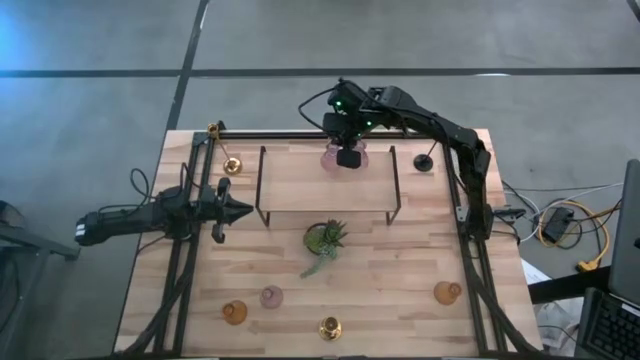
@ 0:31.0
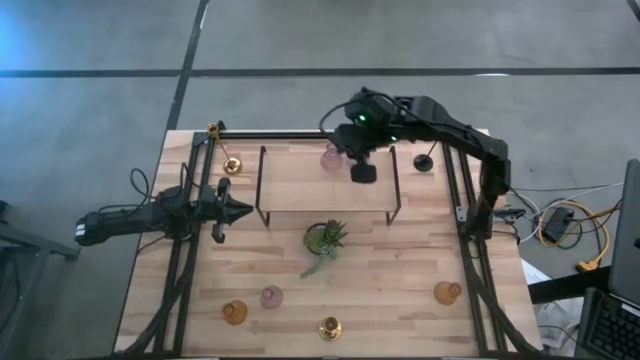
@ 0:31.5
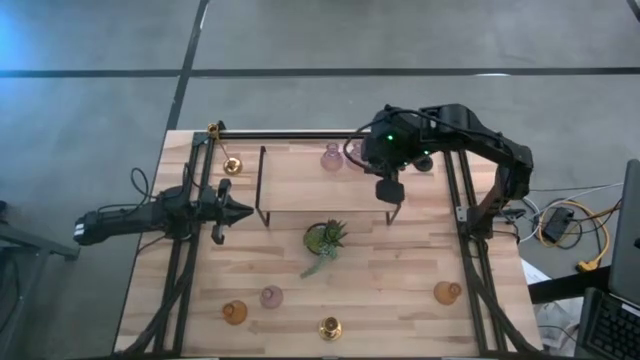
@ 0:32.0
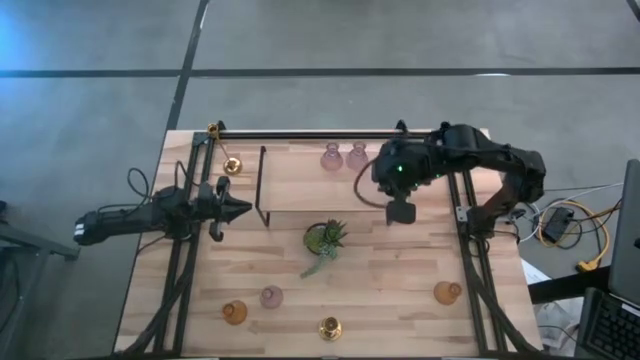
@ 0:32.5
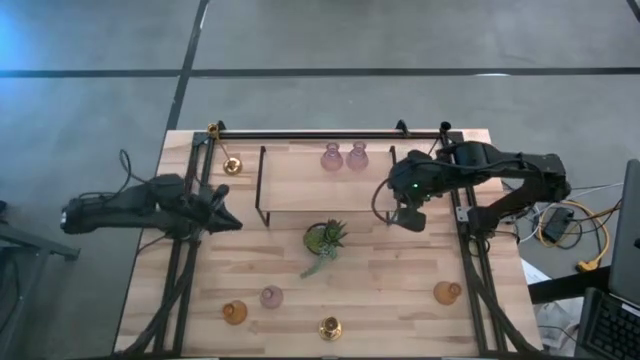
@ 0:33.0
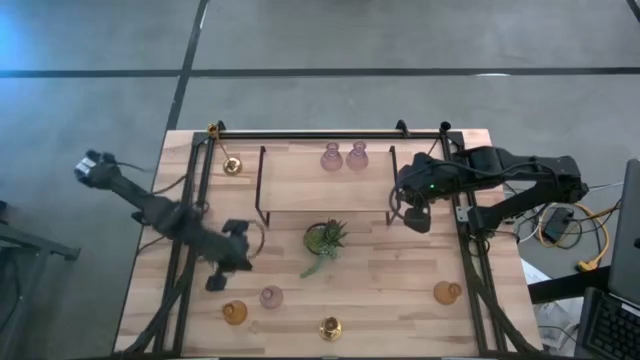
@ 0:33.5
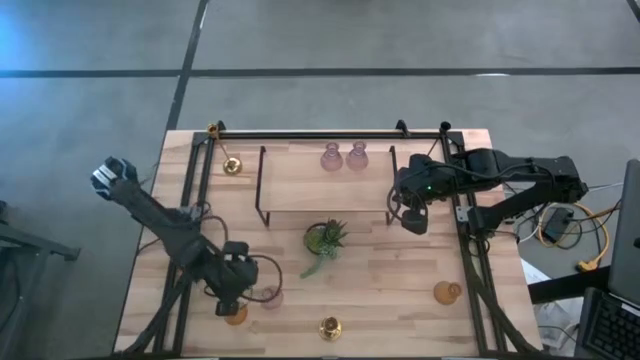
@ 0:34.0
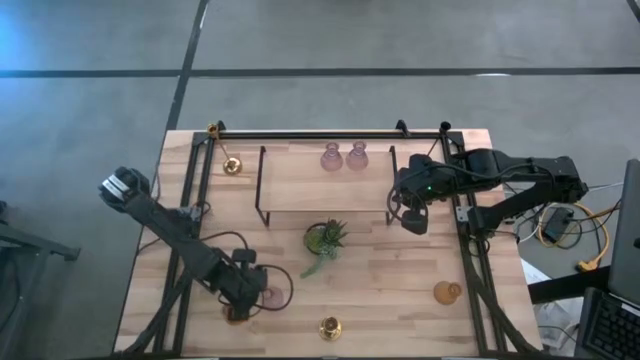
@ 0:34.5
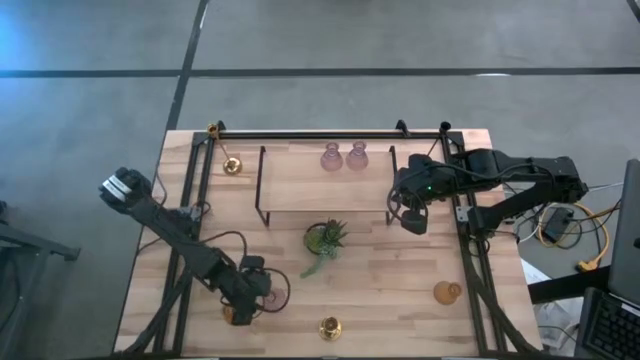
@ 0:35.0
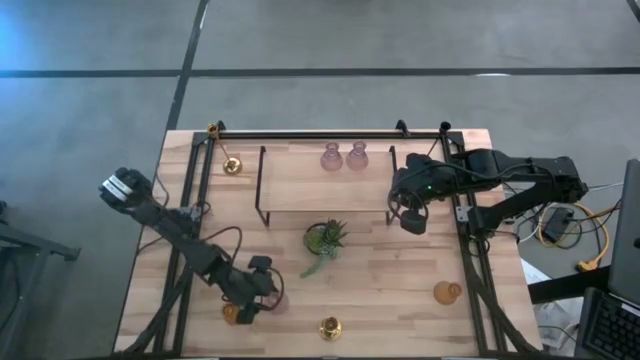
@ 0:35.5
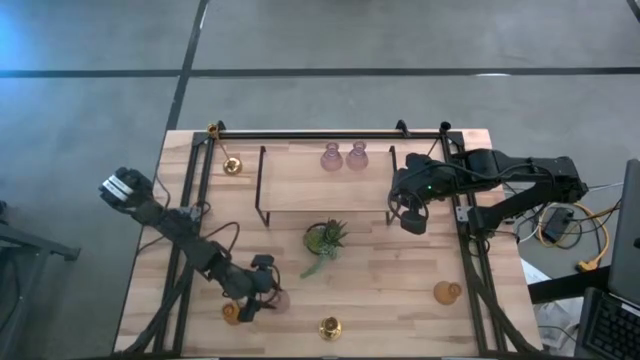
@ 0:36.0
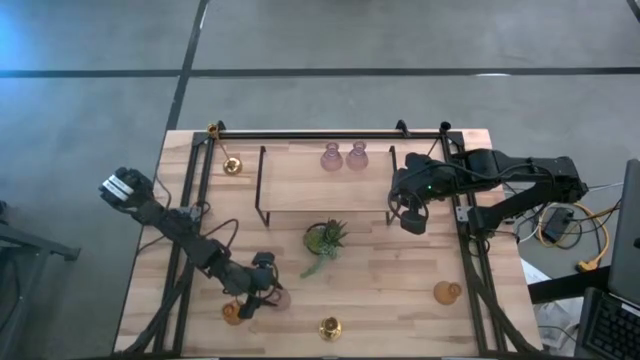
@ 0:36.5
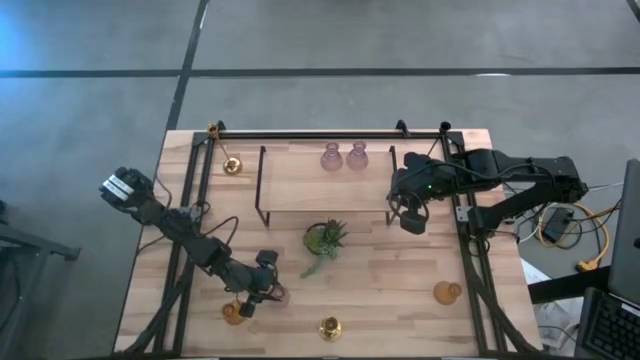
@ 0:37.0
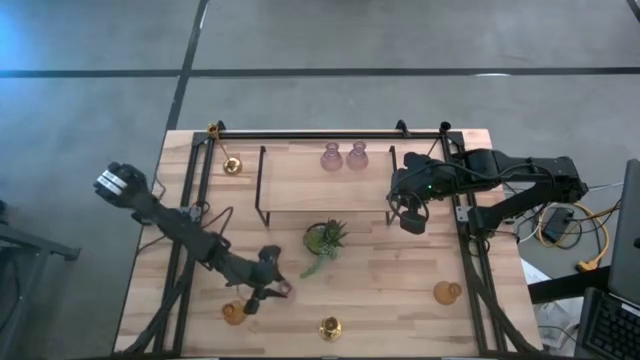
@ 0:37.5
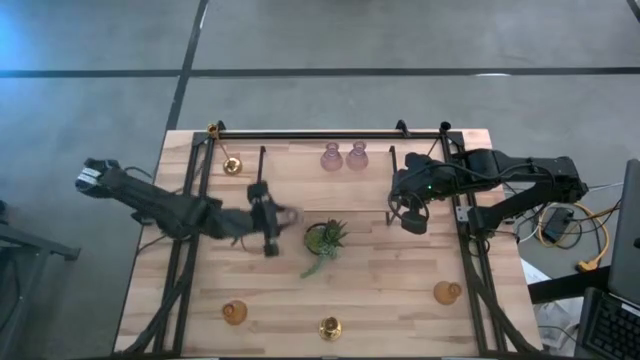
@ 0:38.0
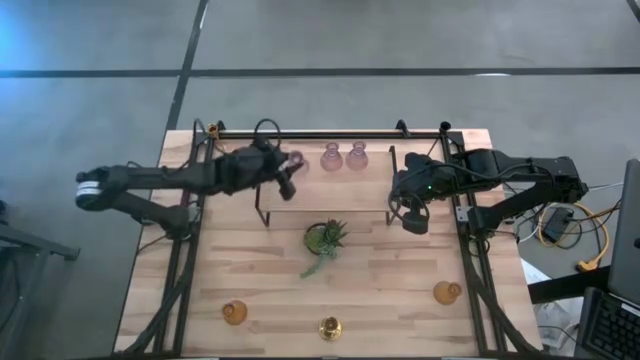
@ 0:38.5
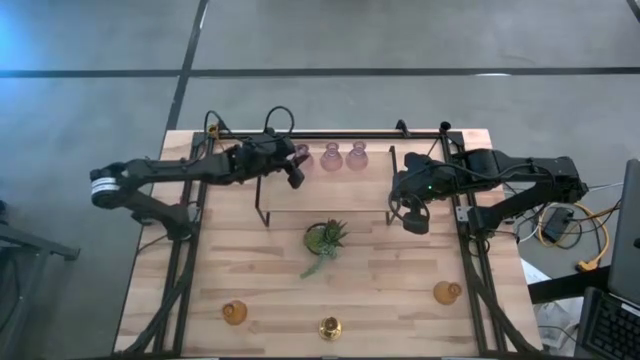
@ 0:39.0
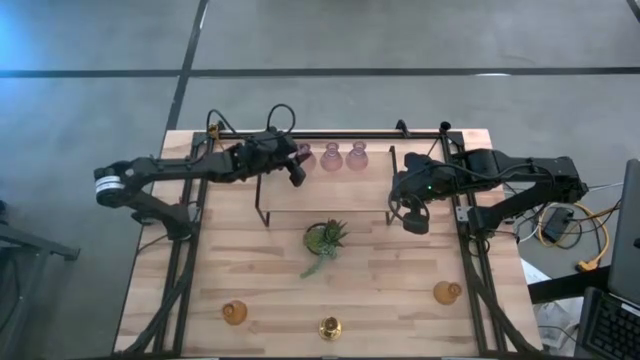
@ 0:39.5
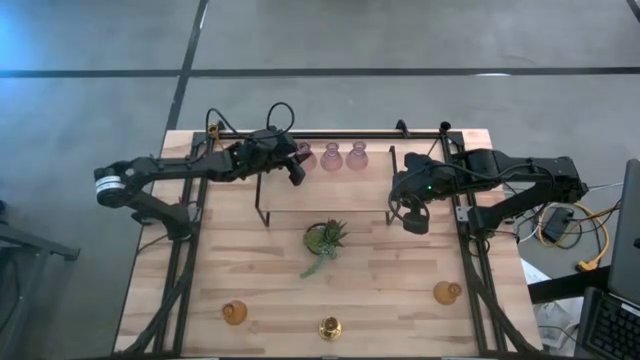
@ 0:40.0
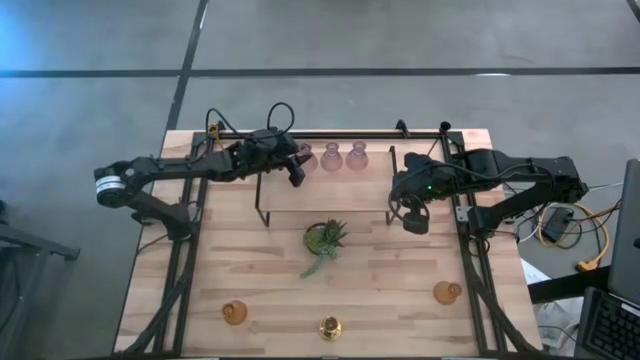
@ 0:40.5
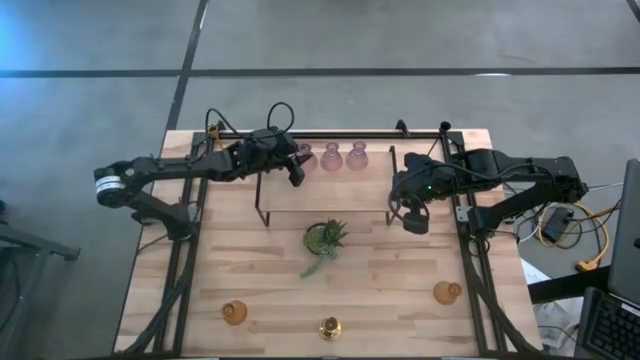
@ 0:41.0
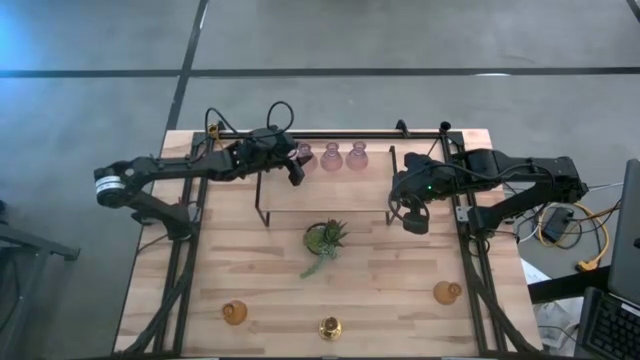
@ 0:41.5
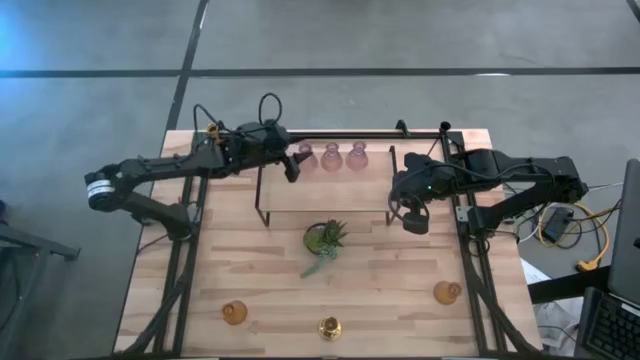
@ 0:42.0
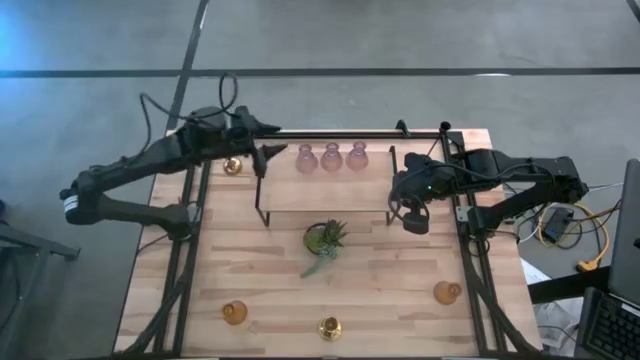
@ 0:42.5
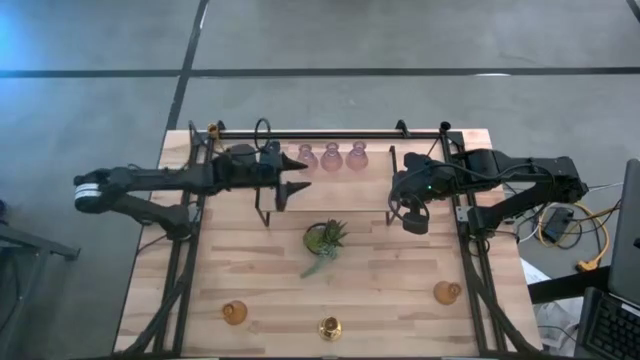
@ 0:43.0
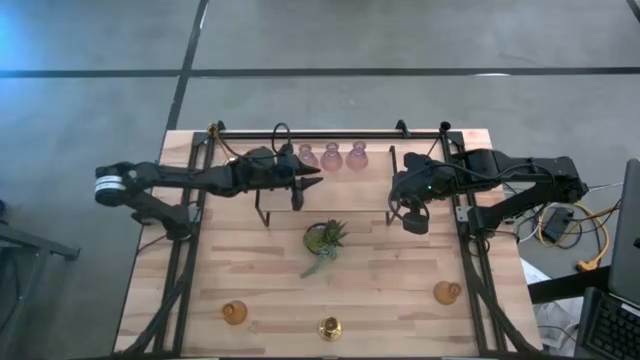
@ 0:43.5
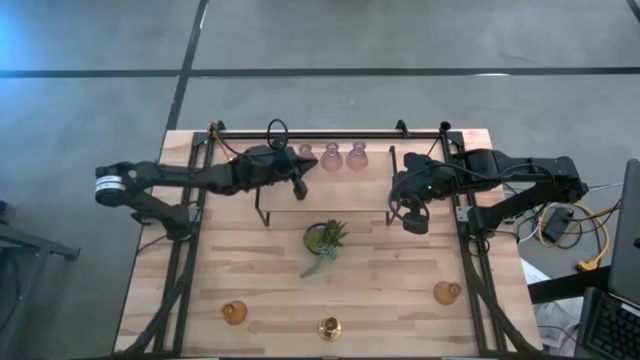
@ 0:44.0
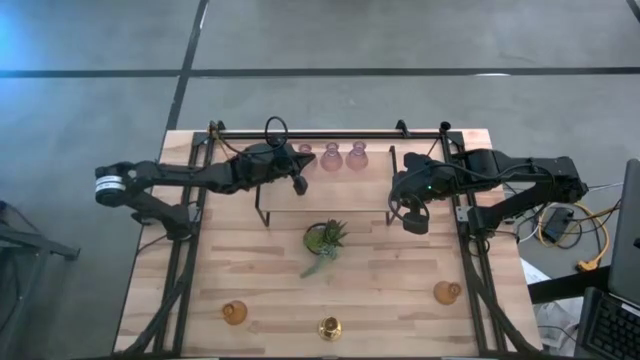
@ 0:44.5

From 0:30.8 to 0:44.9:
Task: Pick & Place candle stick holders
Put the purple glass candle holder on the shelf

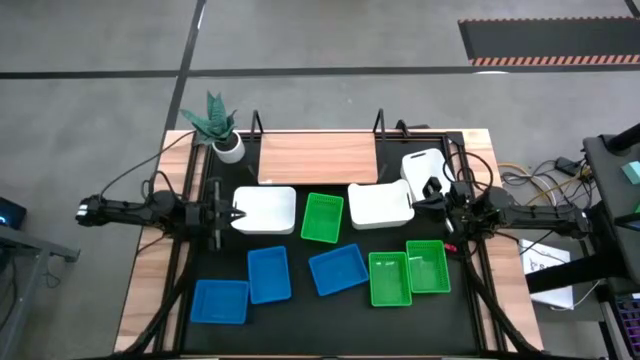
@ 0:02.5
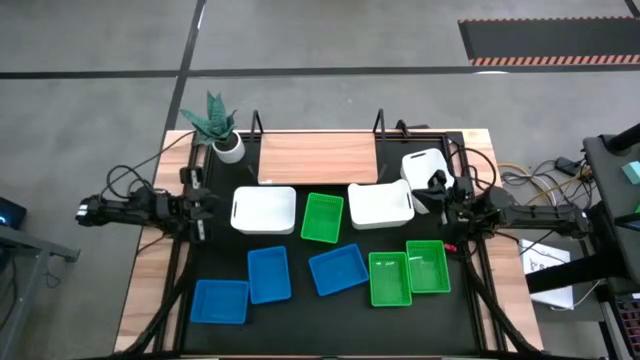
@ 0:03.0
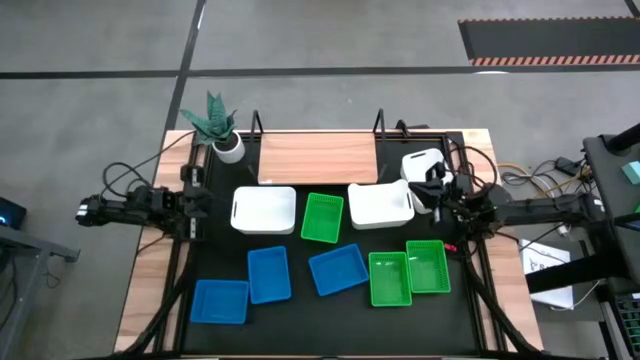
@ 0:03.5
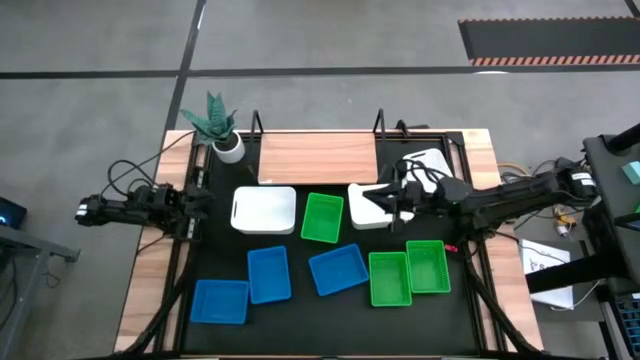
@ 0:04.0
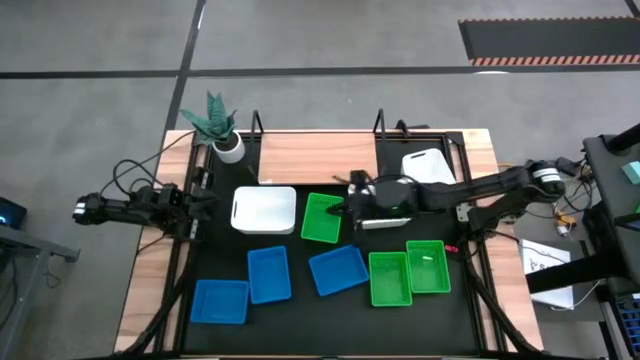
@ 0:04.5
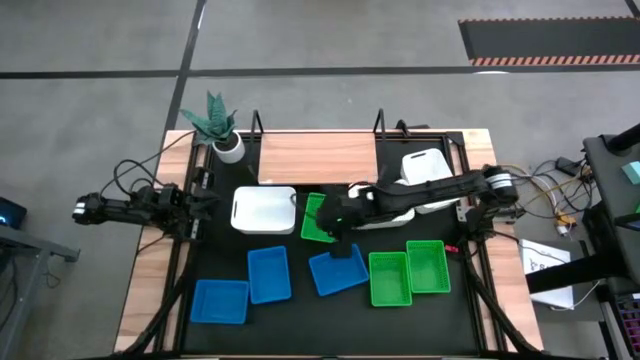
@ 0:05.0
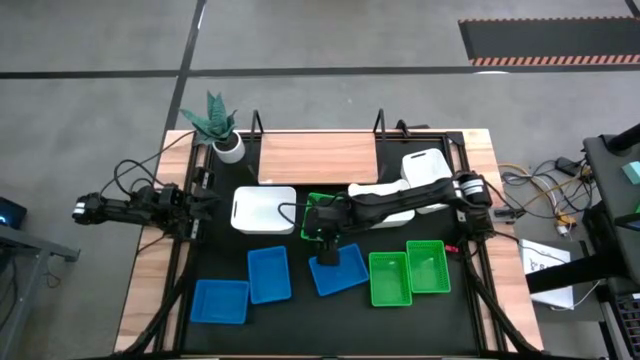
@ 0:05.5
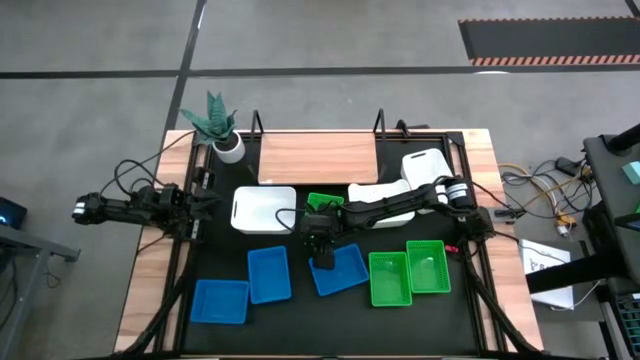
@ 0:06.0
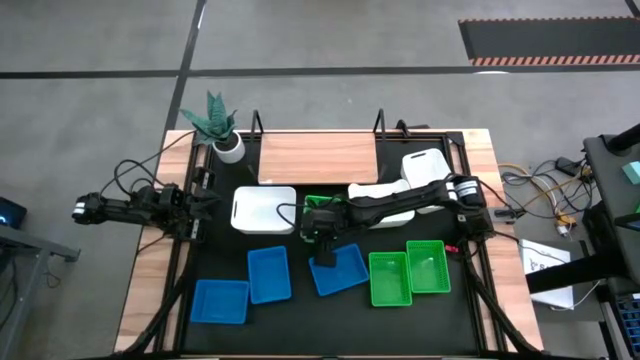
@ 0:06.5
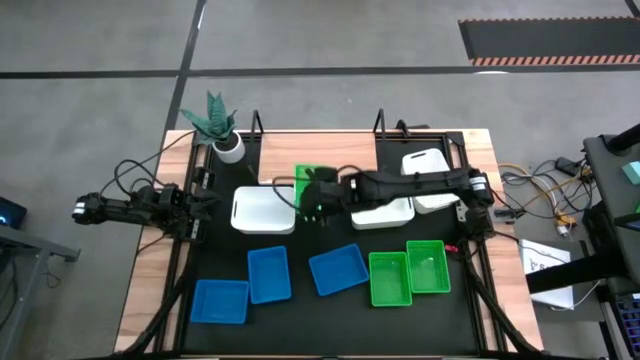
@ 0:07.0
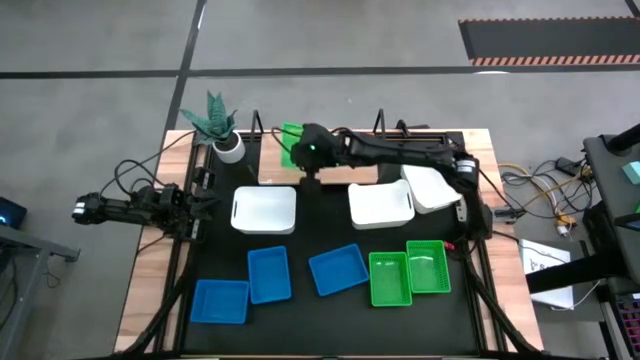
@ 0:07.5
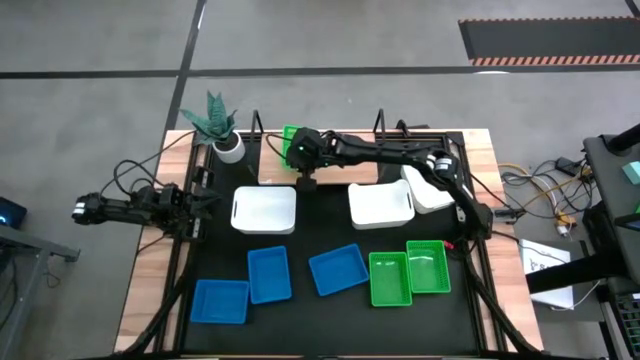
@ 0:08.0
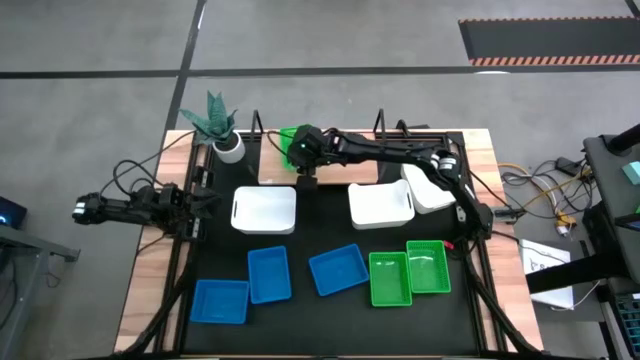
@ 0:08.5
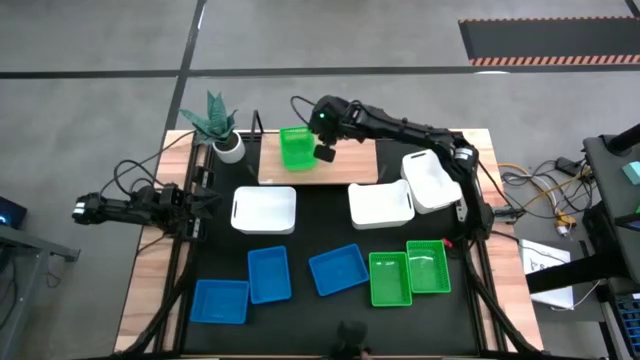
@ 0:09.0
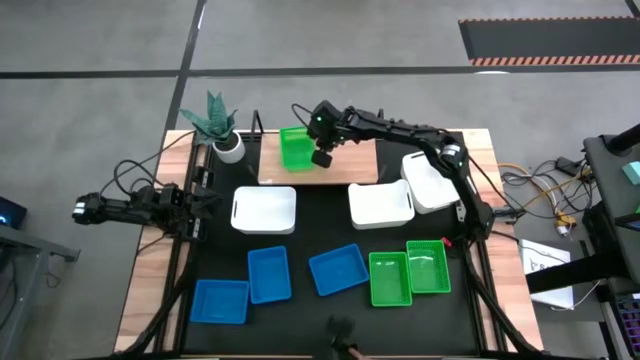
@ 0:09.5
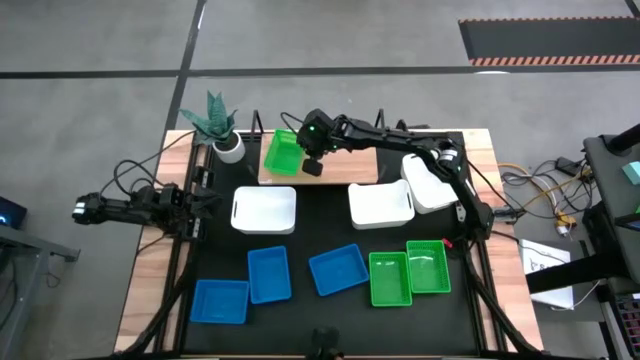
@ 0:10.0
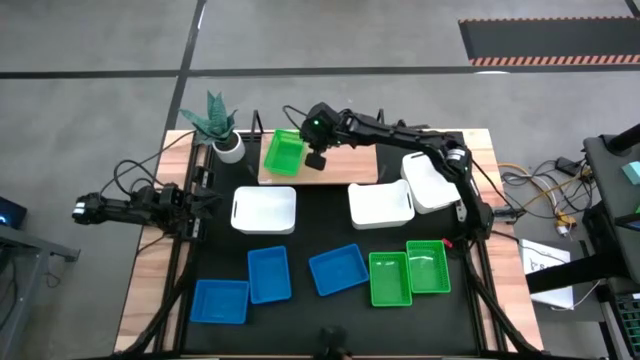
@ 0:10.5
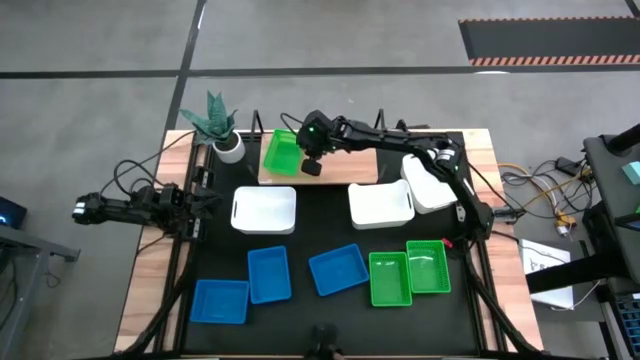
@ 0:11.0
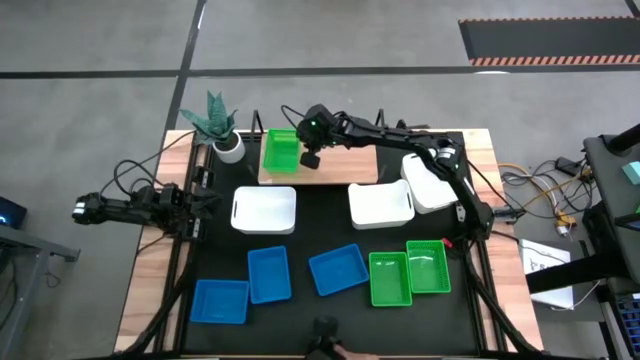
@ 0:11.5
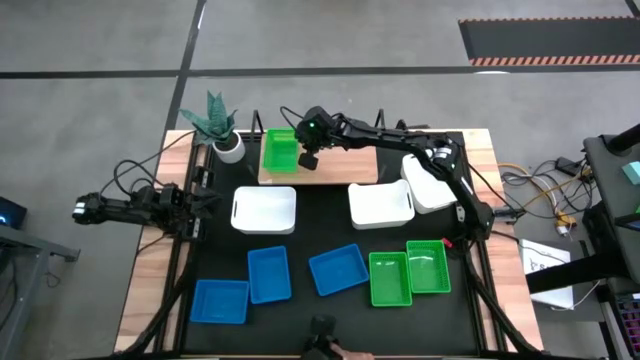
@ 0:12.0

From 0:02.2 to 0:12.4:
Task: Stack baskets on shelf by color
Put the top left green bin on the shelf
